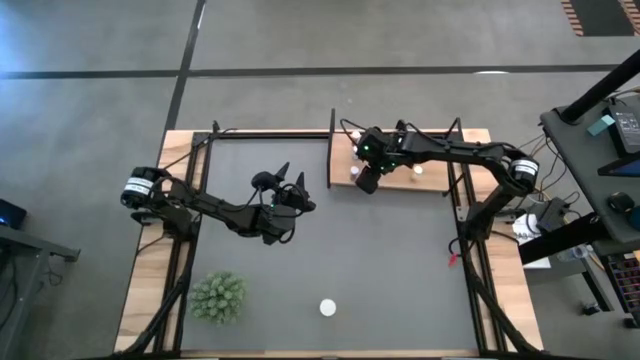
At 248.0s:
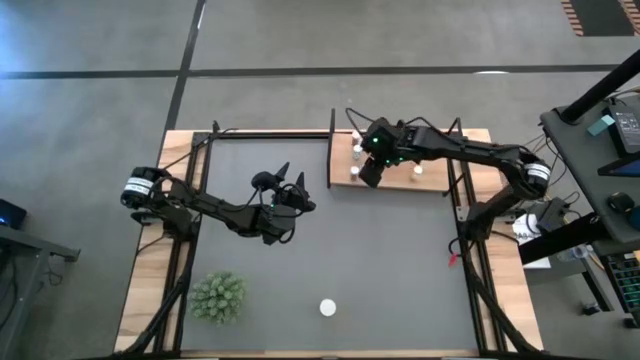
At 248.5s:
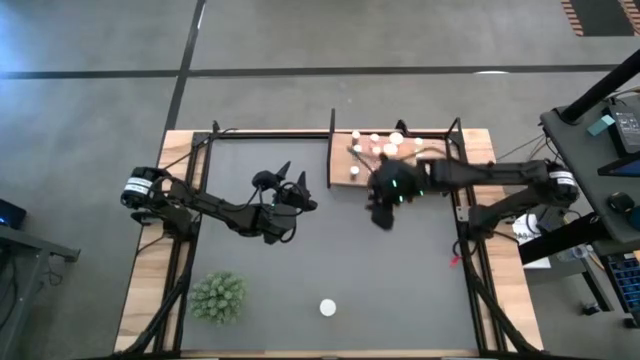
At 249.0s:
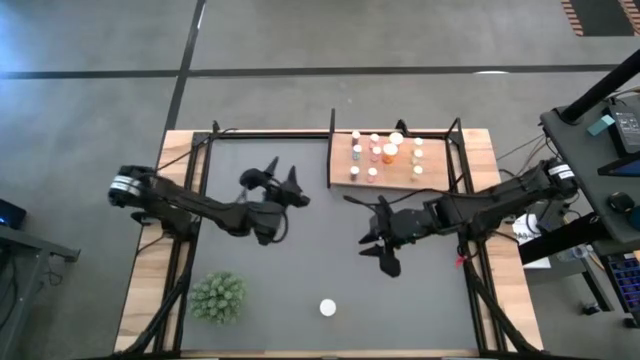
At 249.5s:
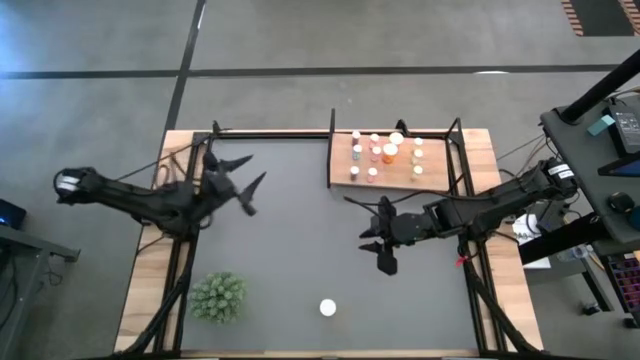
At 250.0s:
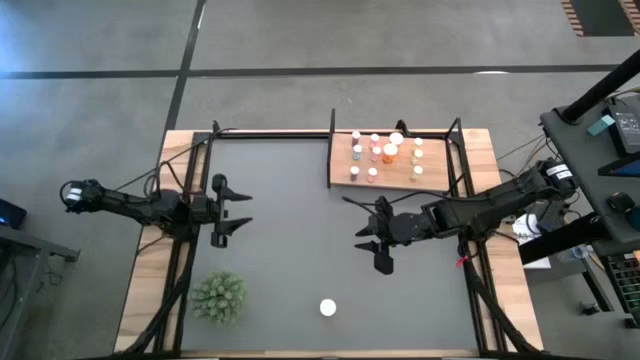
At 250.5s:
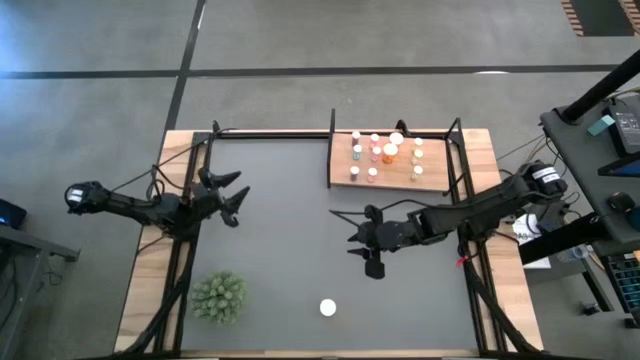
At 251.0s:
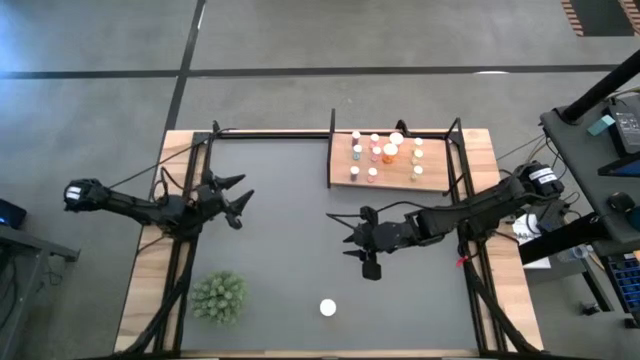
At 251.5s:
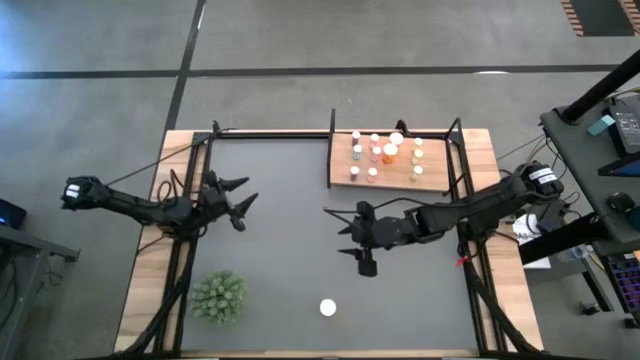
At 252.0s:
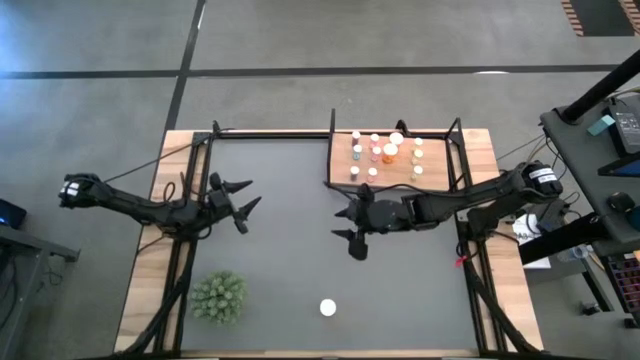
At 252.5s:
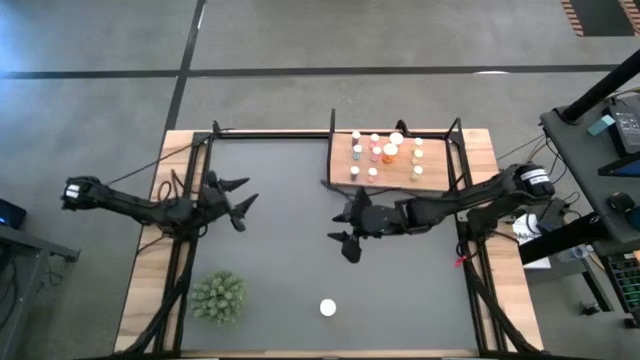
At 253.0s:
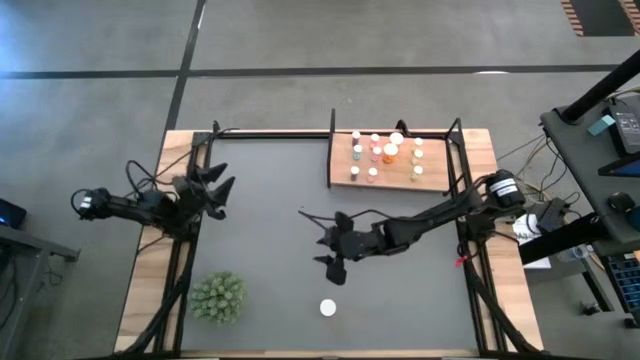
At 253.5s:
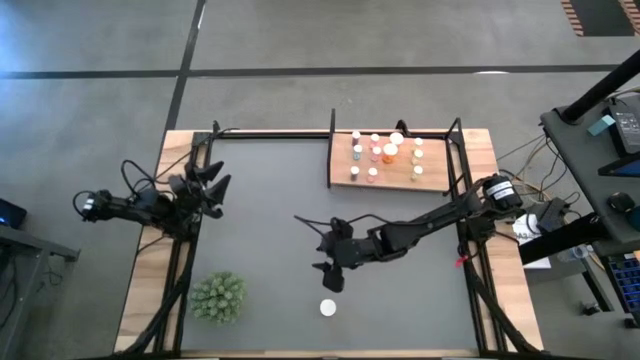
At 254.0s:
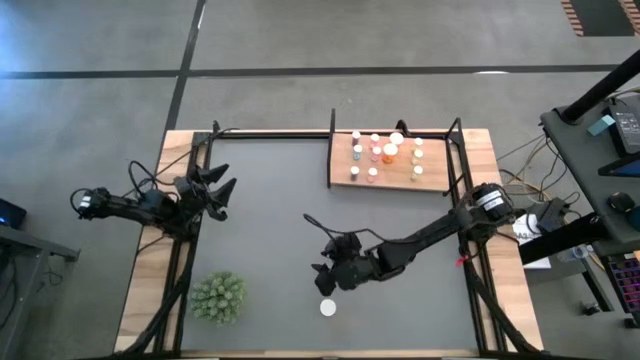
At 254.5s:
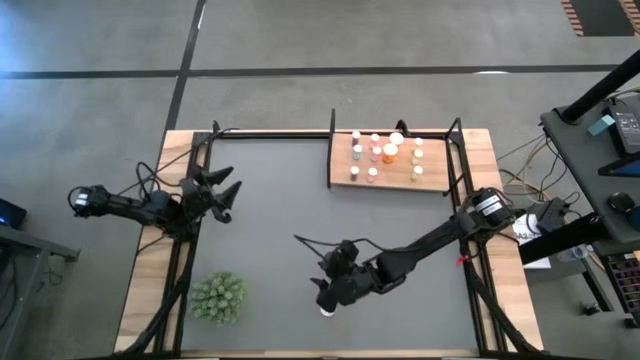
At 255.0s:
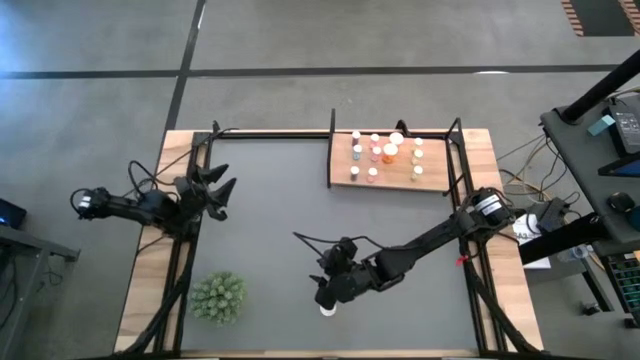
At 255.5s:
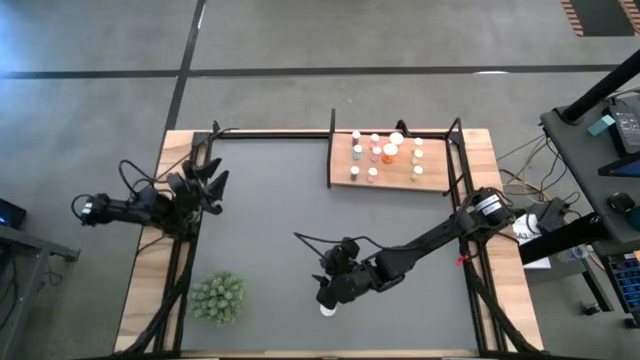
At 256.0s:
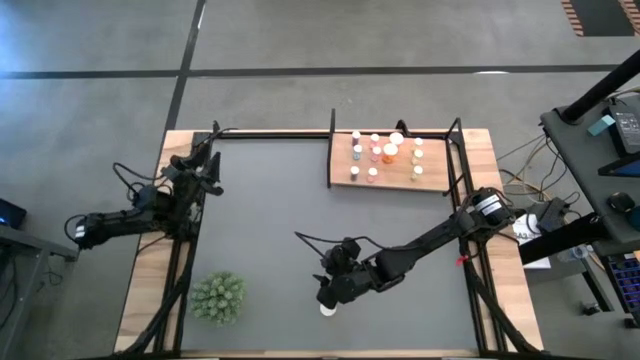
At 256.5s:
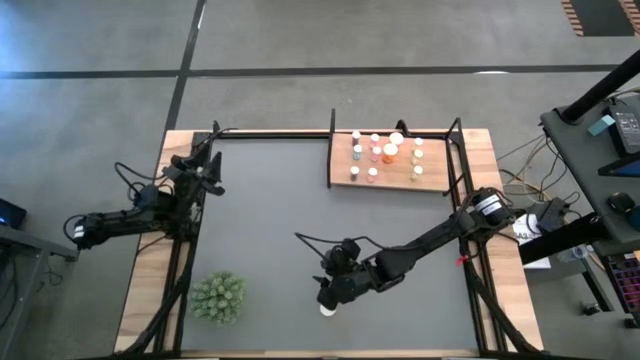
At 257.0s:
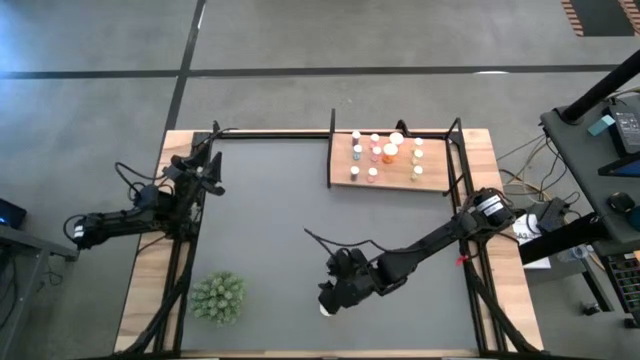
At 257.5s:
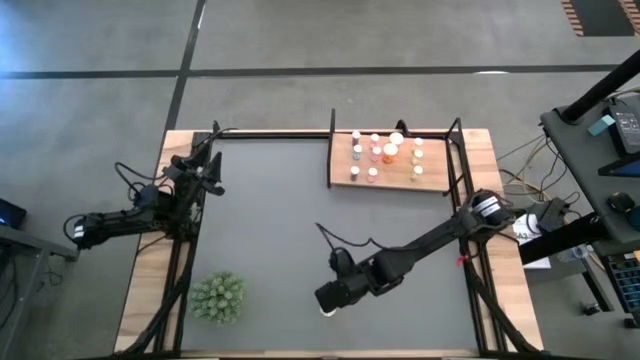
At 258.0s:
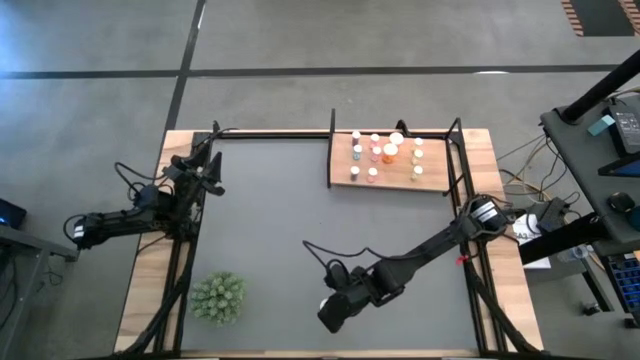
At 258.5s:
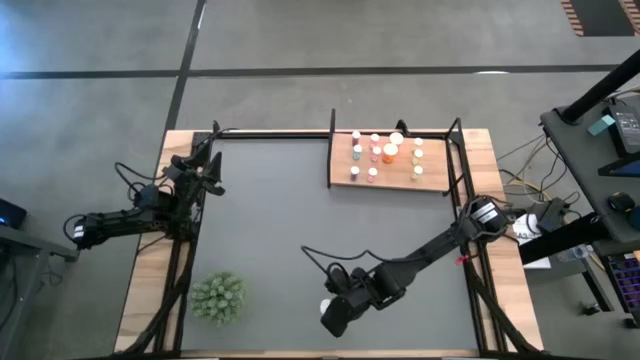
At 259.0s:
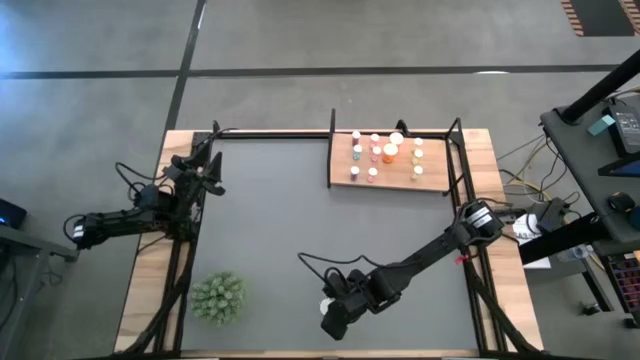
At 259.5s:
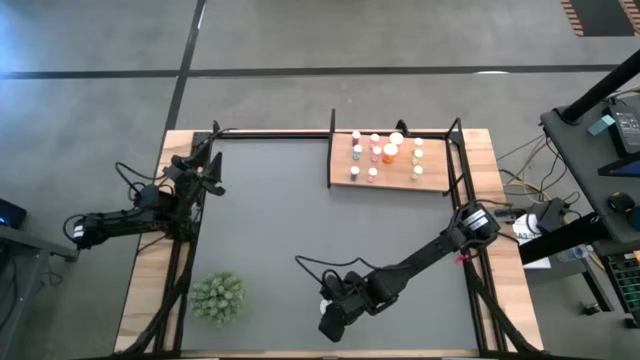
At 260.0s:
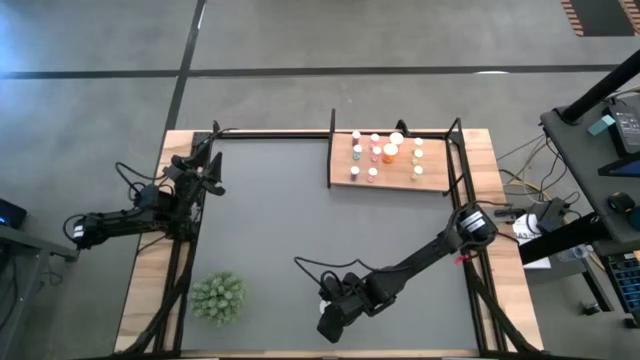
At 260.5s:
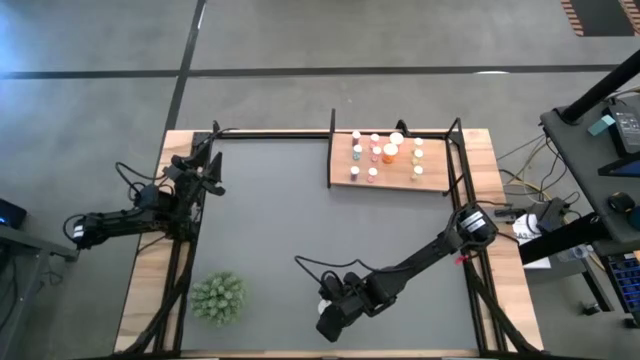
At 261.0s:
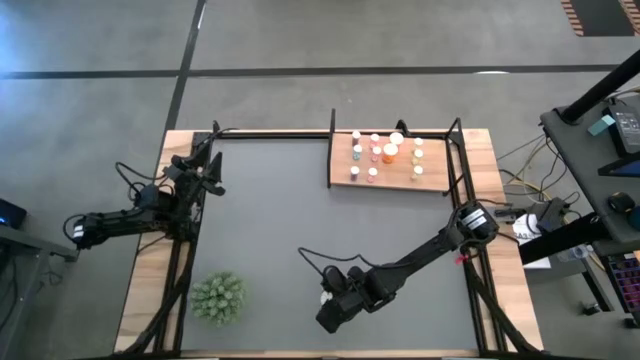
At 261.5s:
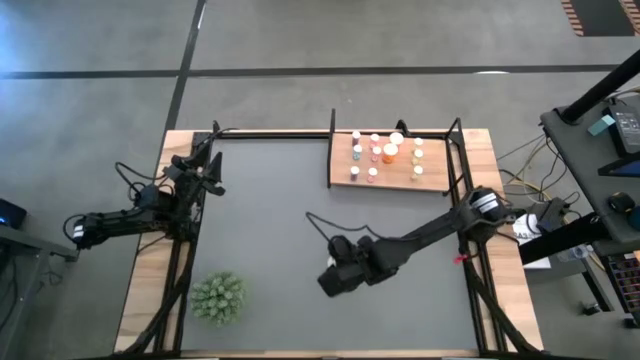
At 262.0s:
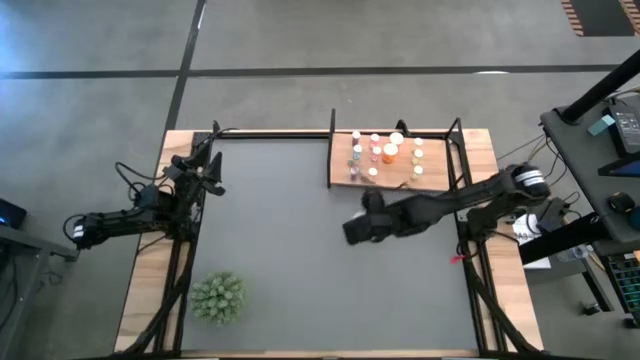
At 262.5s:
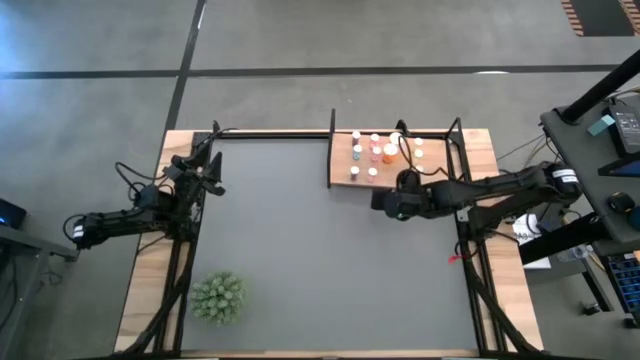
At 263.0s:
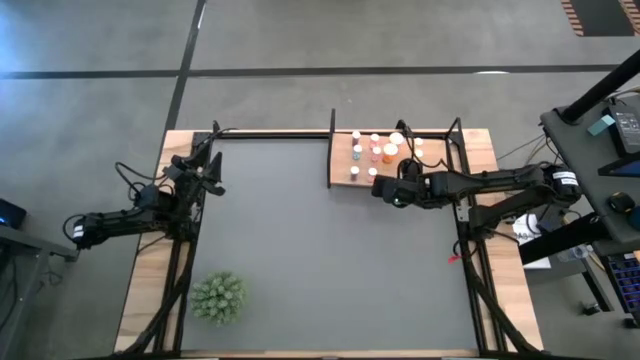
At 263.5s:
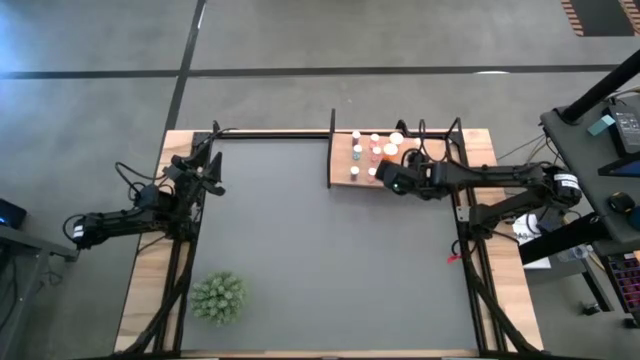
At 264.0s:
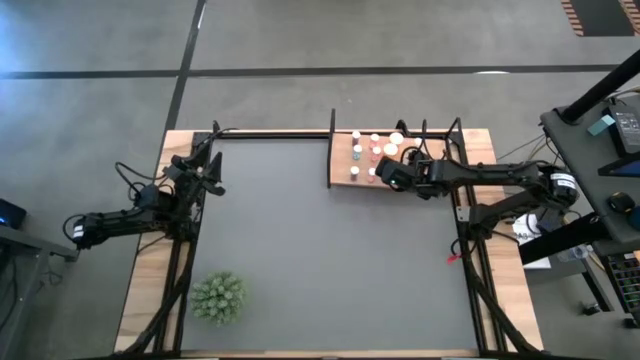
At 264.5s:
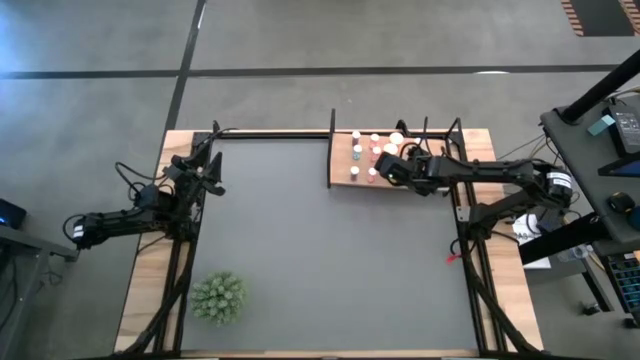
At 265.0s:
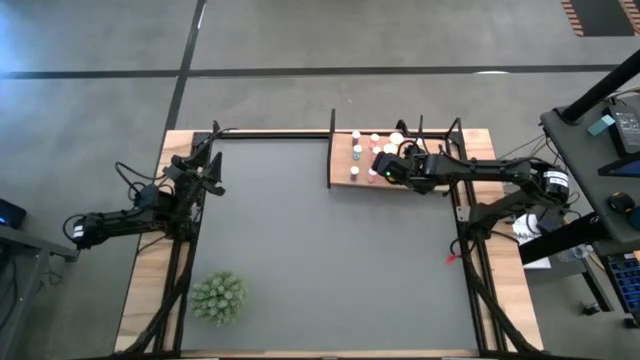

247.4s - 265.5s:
Task: Pick and place medicine bottles onto shelf by color
Put the orange pill bottle on the shelf aligned with the other orange pill bottles

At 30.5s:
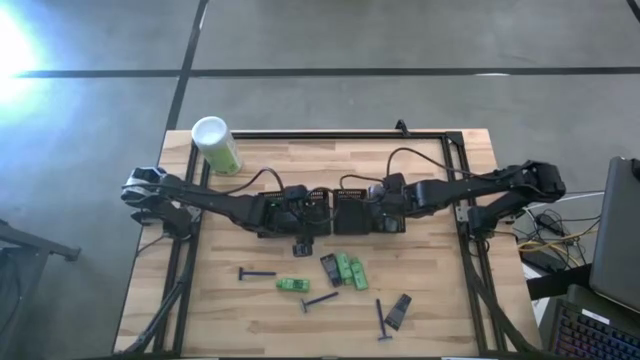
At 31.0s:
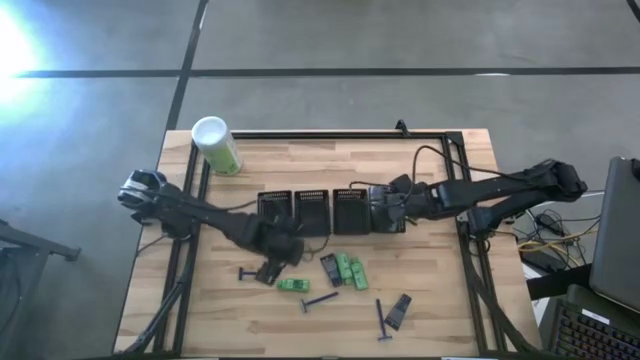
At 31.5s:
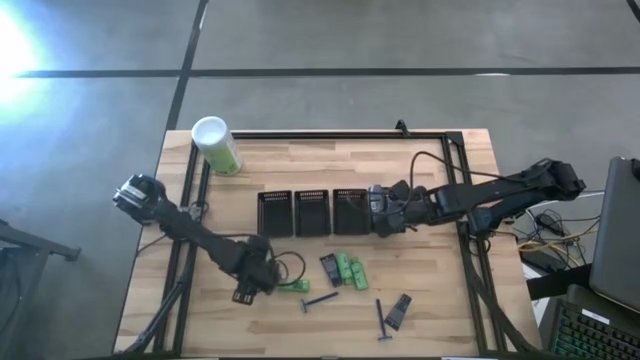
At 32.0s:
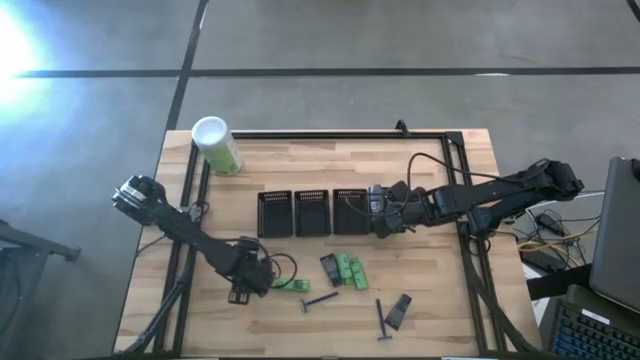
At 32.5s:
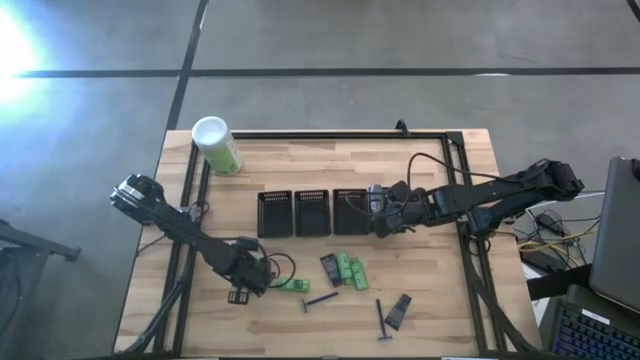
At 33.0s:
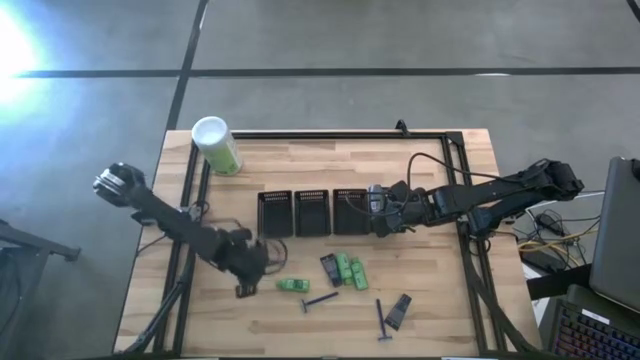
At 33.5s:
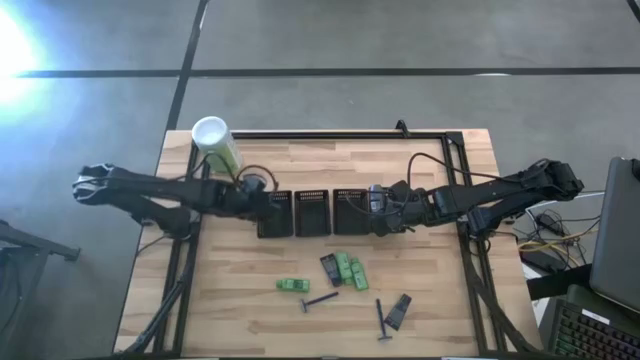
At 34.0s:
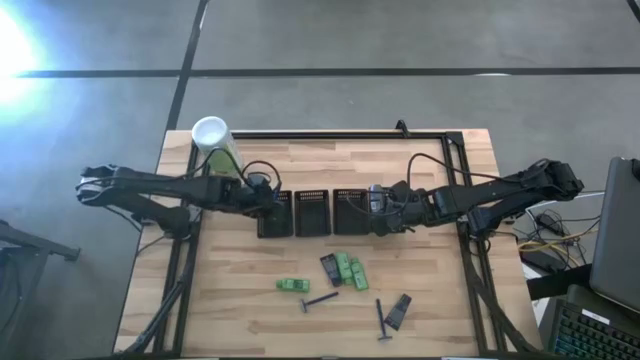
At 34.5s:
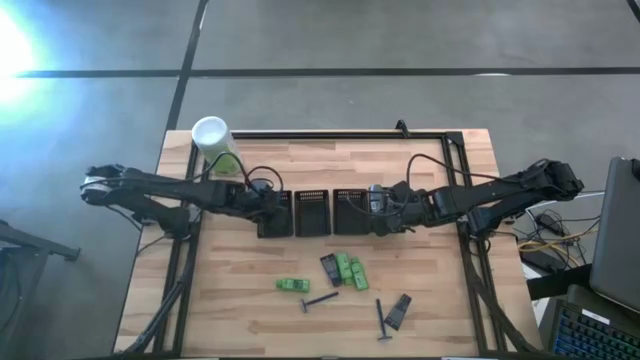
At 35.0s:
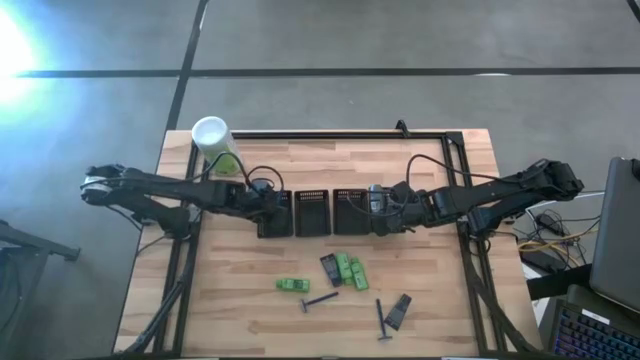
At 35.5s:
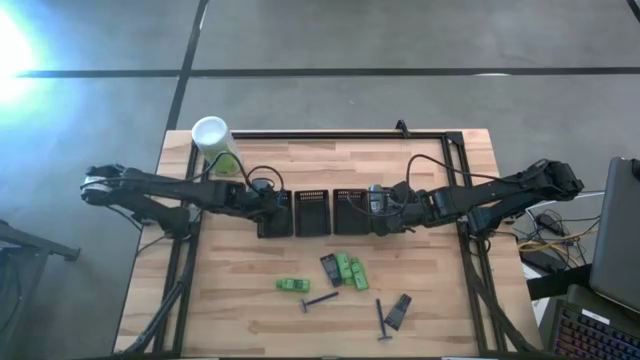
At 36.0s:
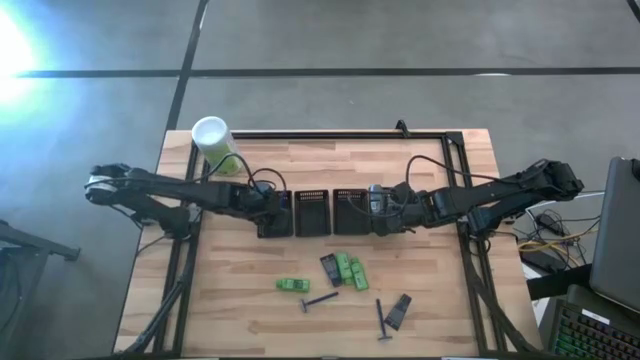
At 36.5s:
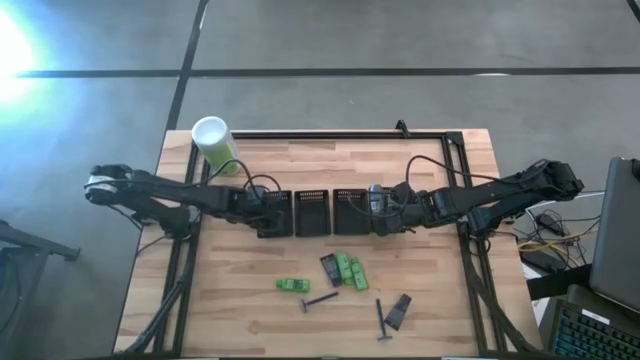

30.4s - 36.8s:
Task: Pick & Place Travel size toiletries
Put the blue razor into the left black basket
